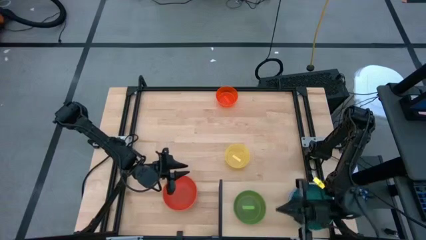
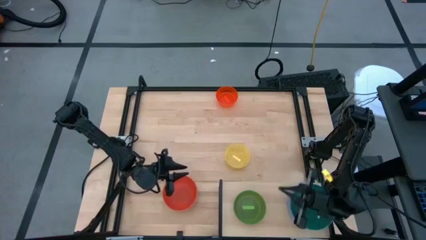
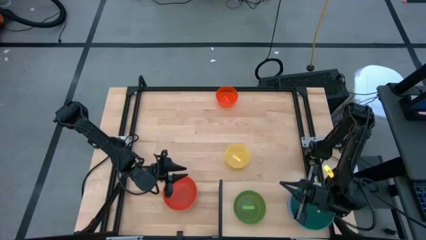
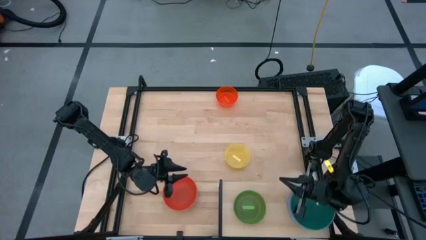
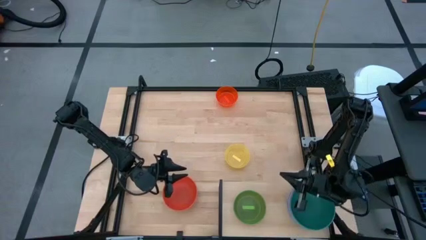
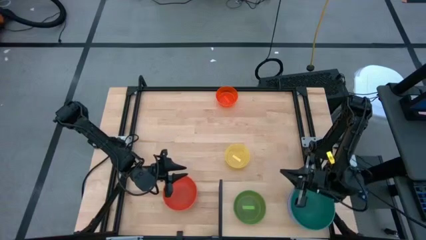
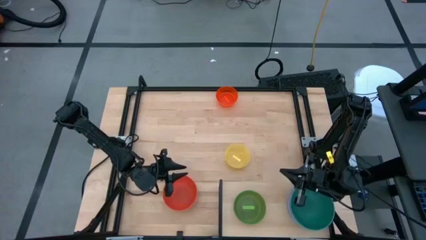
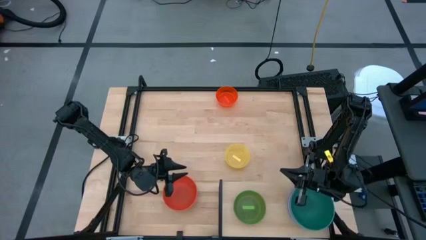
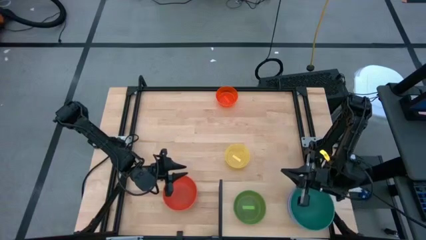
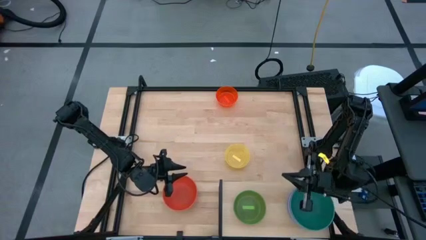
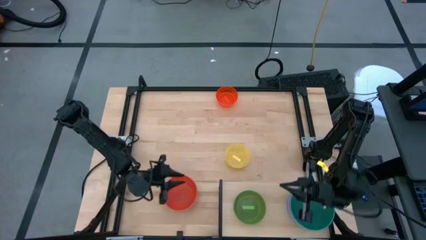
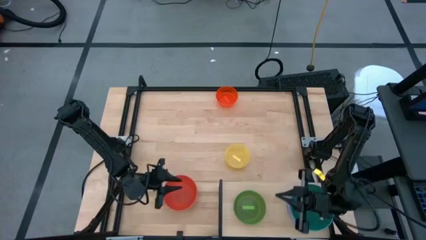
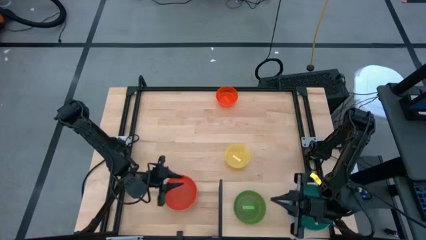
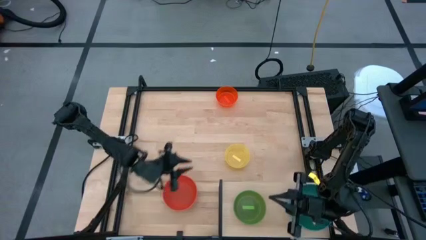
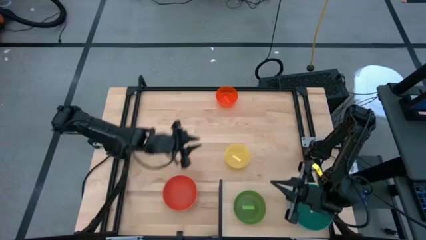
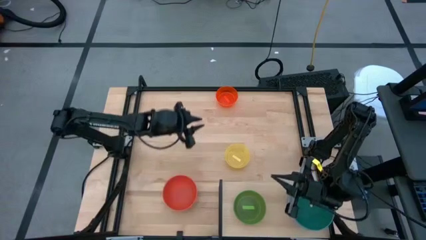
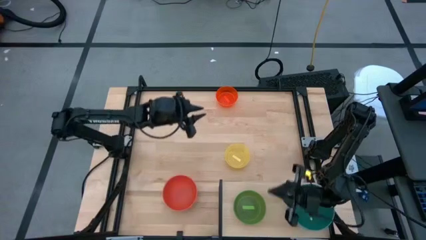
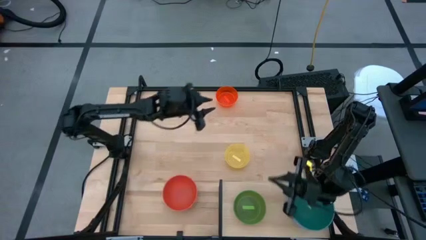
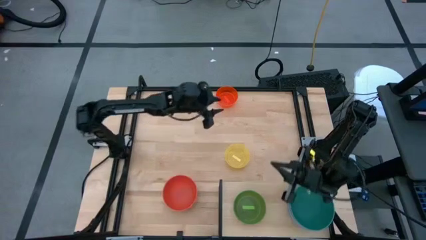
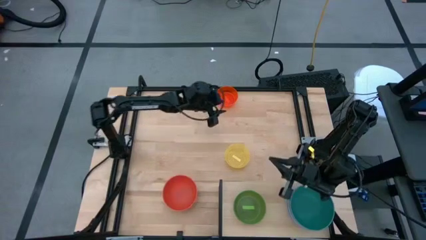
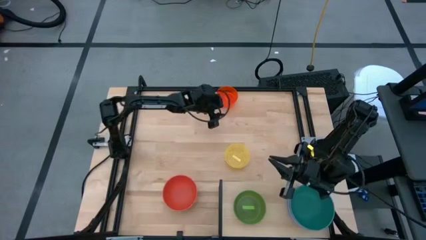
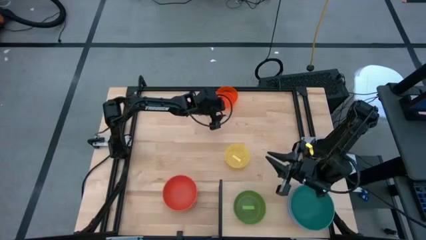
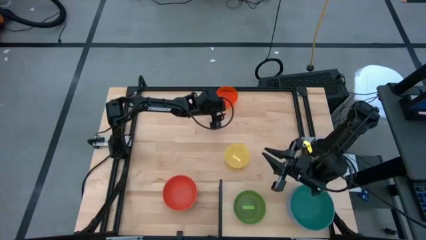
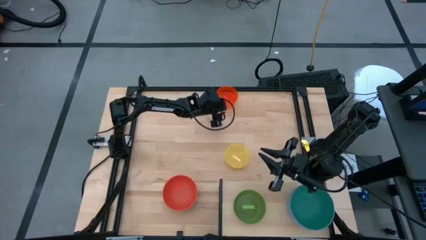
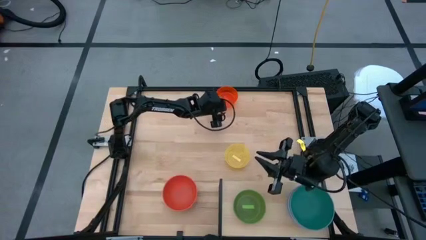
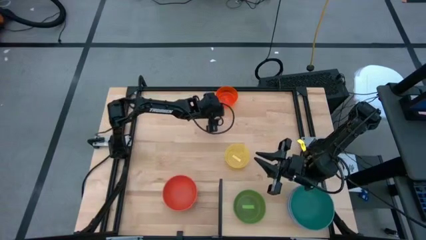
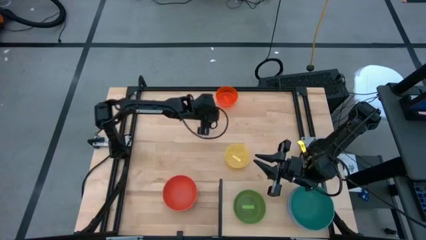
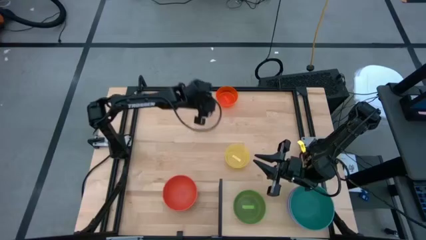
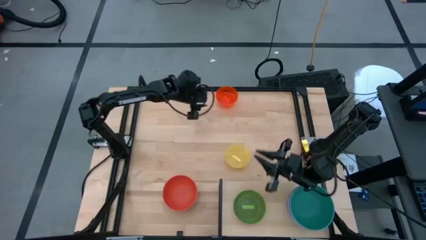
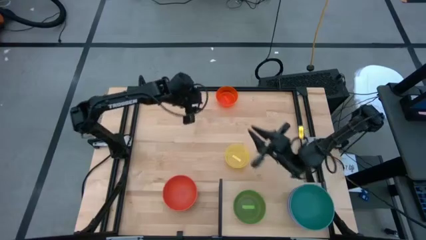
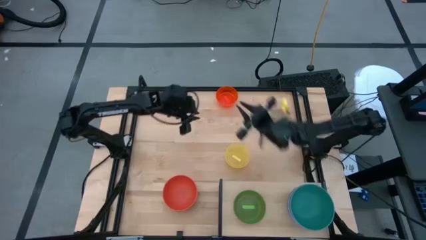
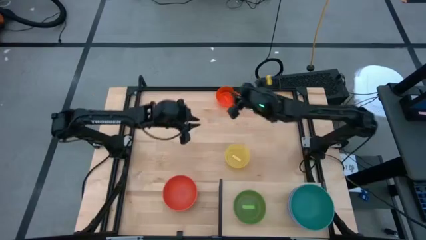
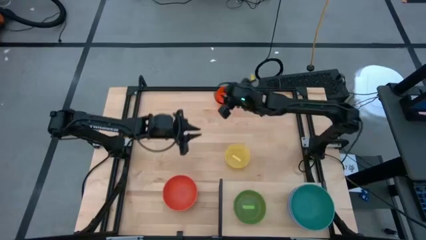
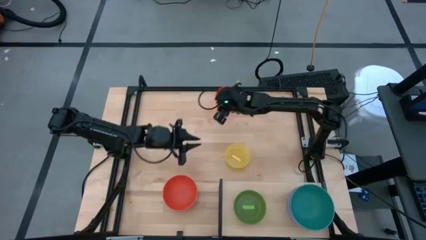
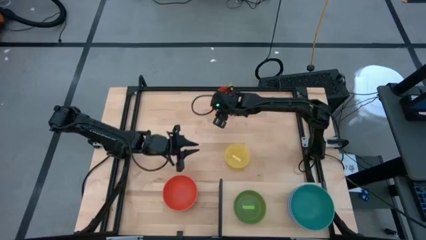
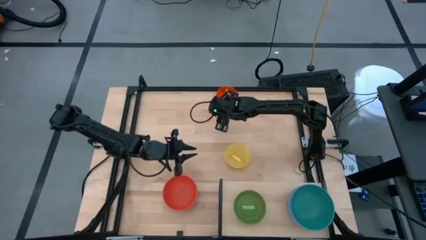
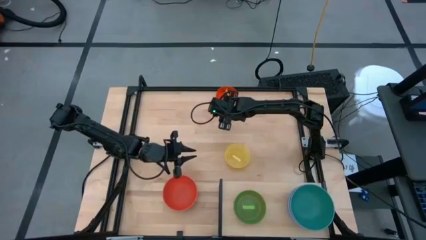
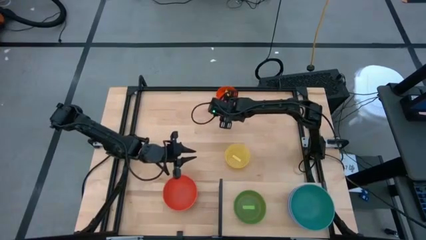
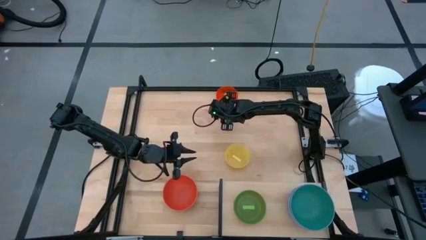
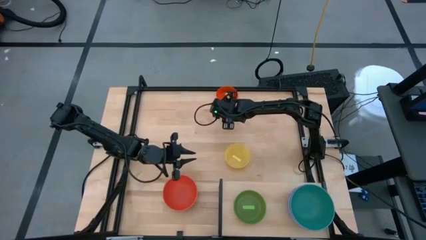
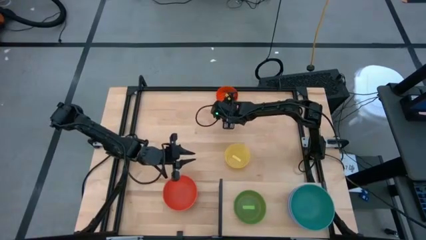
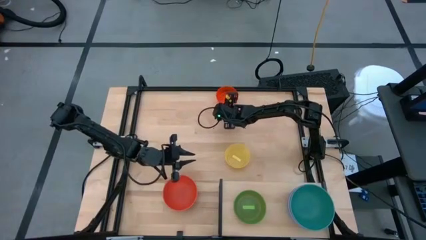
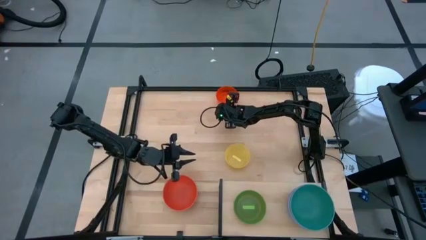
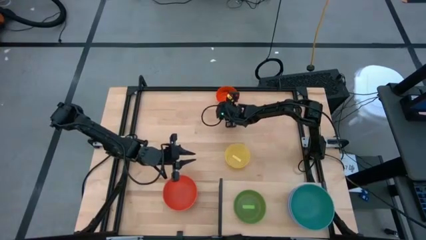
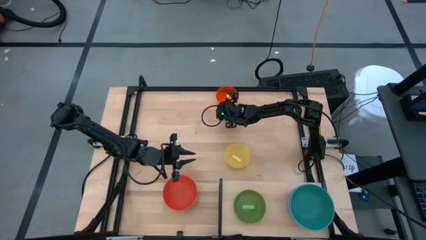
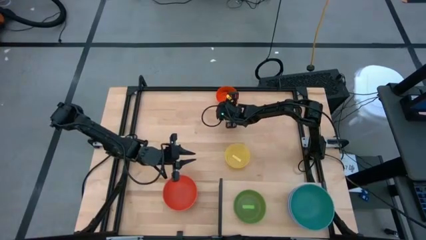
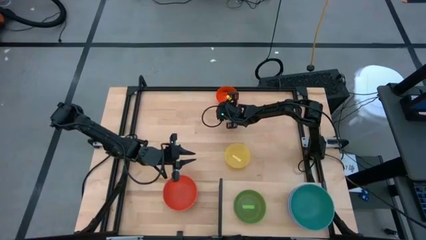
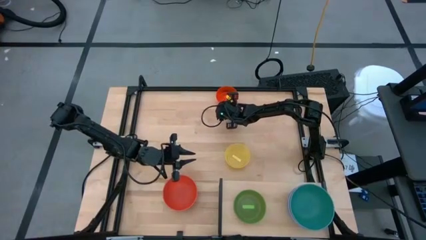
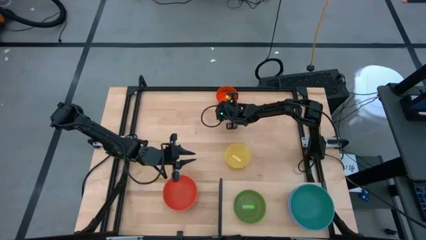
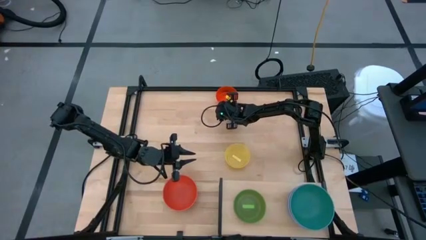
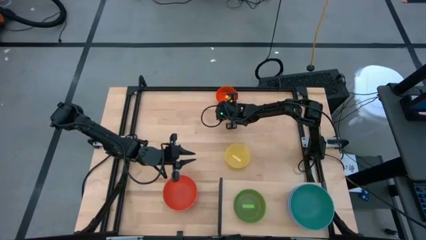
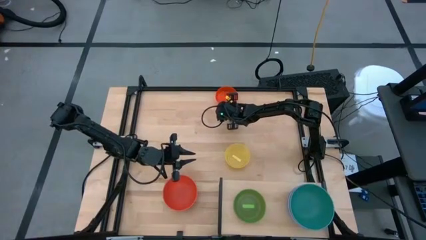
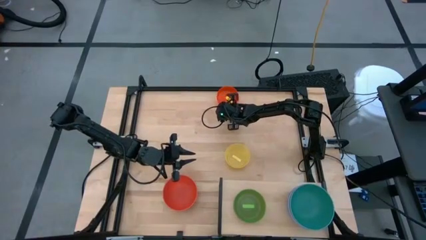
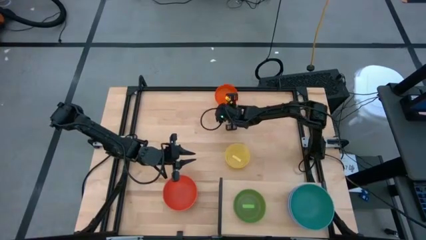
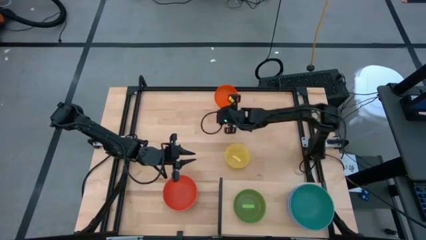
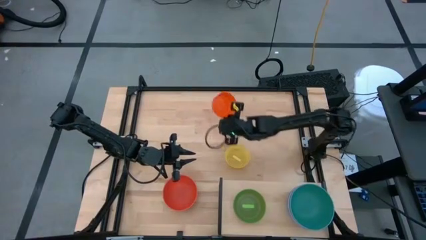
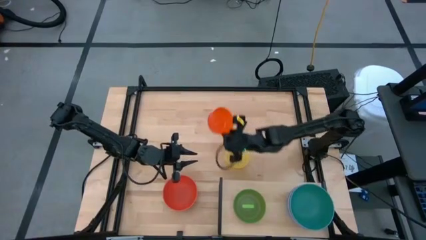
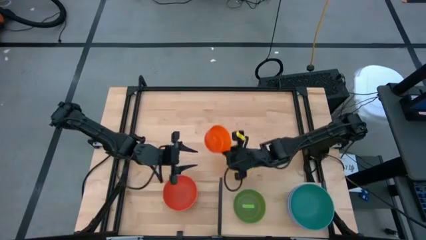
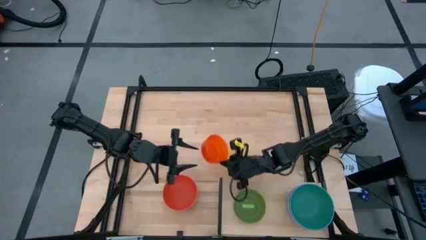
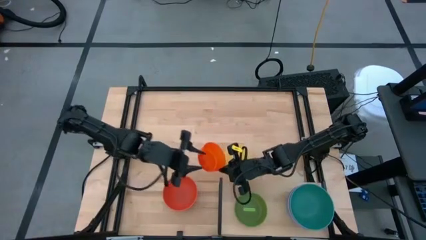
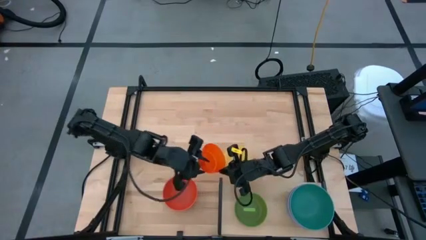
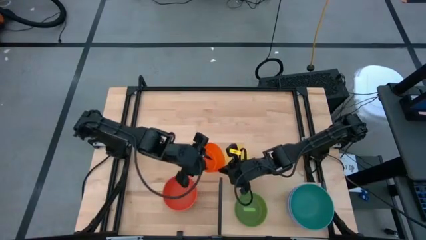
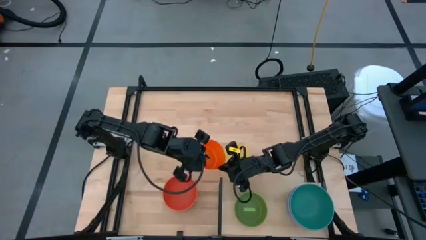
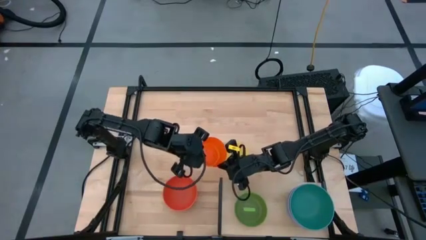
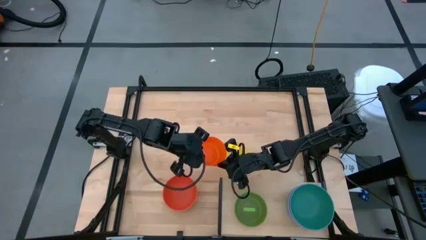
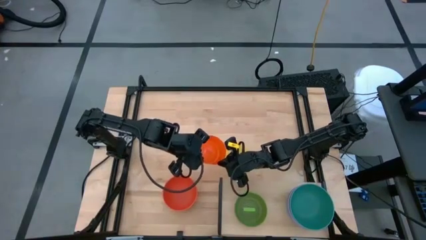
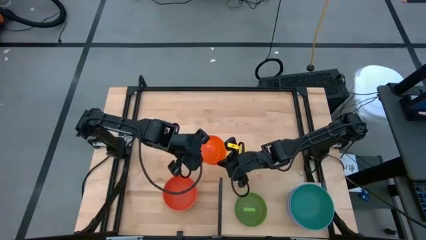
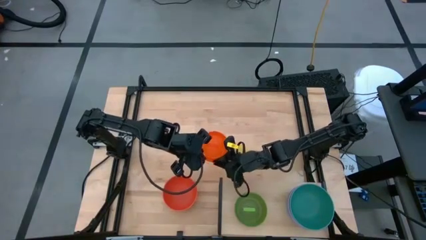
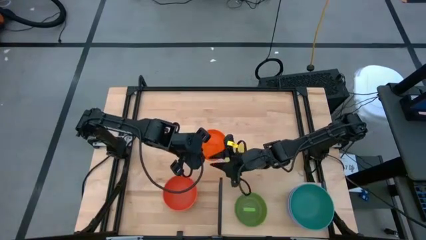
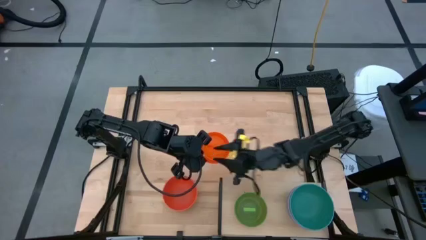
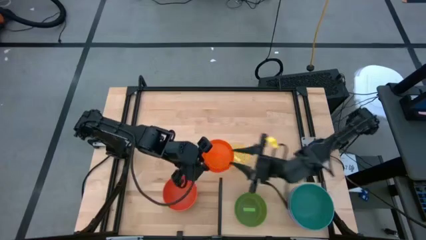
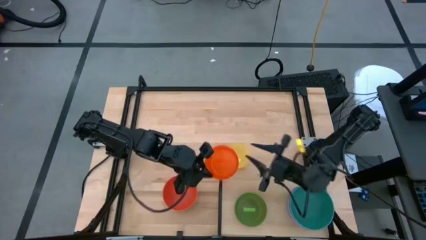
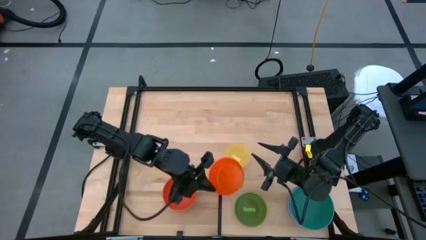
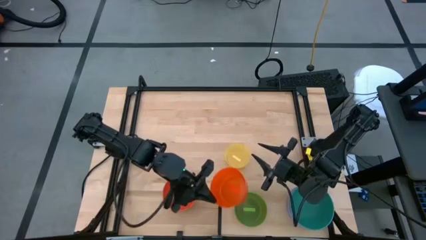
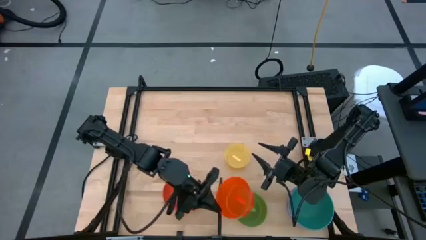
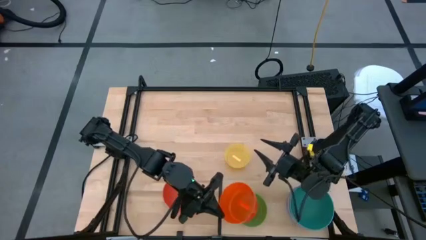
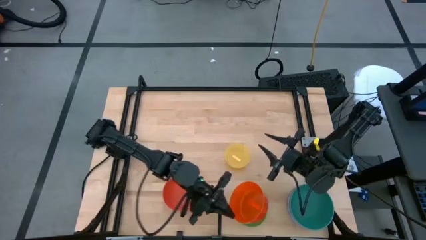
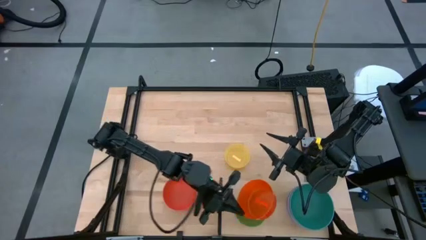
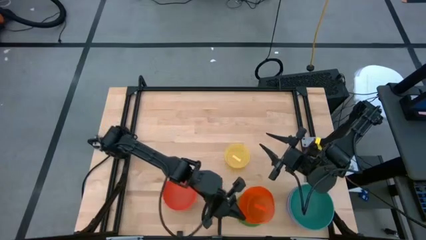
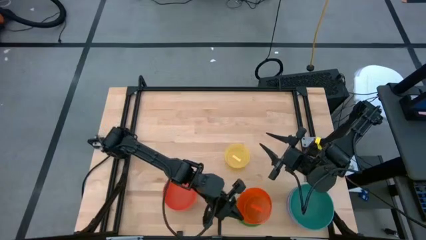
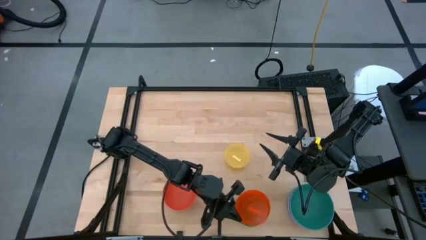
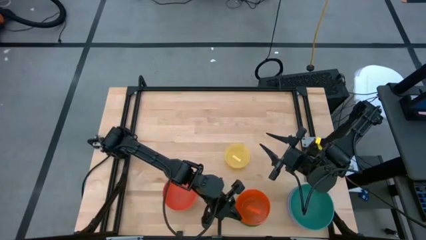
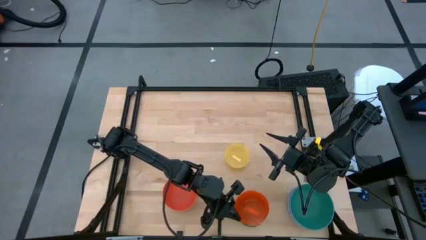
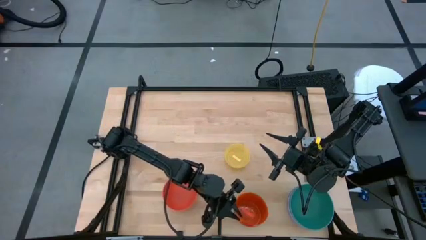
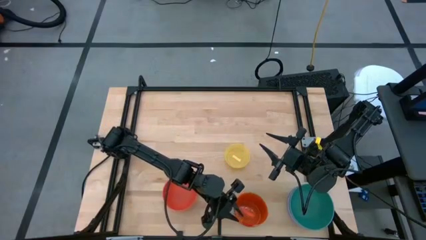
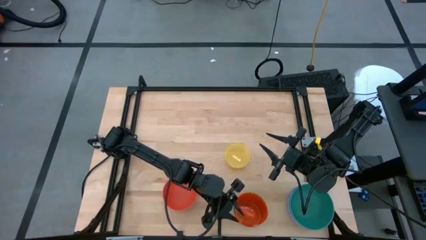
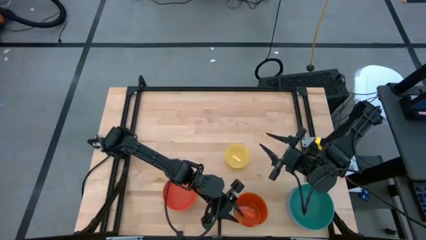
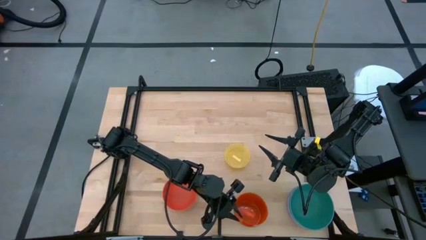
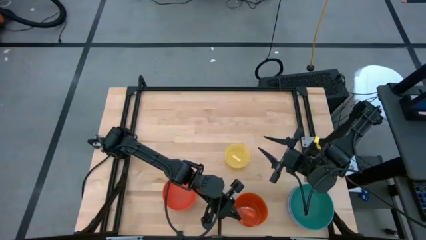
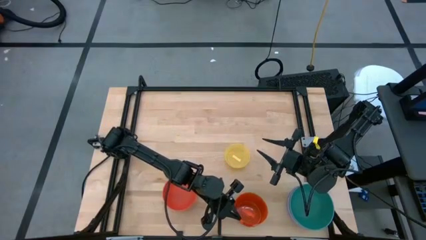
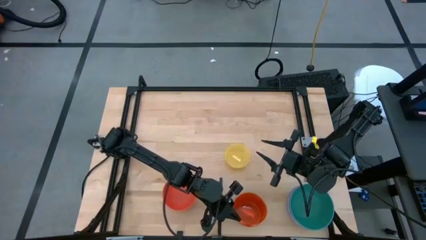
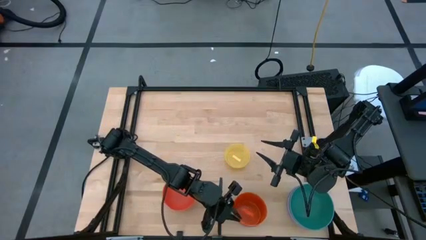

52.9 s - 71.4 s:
Task: Place and stack bowls onto a shelf
Stack the light orange bowl on top of the green bowl on the shelf
